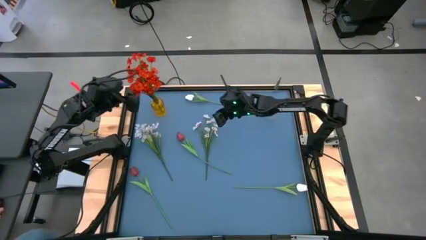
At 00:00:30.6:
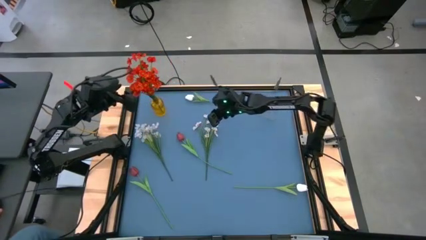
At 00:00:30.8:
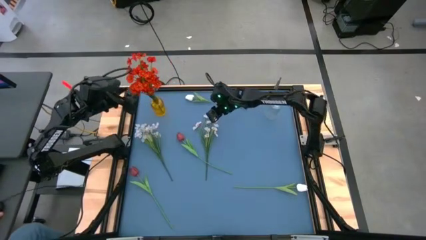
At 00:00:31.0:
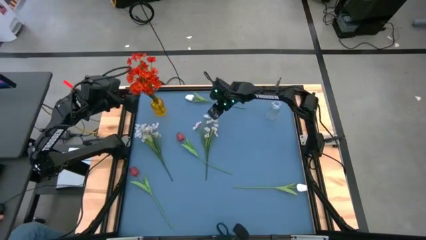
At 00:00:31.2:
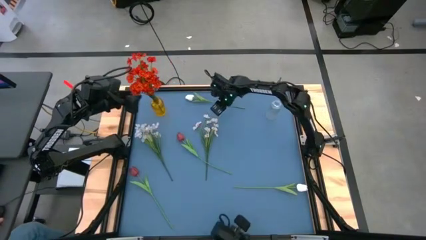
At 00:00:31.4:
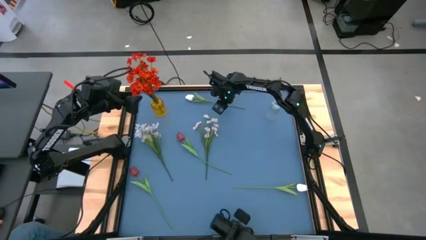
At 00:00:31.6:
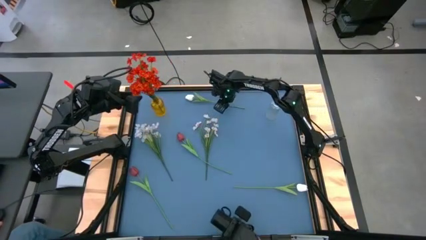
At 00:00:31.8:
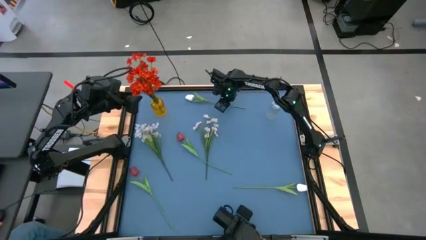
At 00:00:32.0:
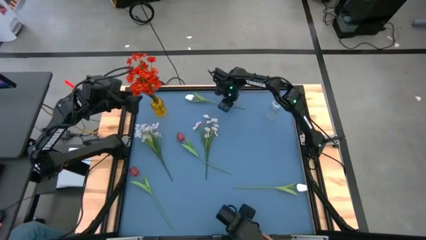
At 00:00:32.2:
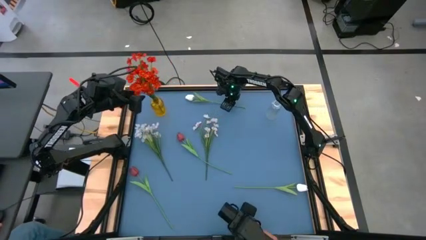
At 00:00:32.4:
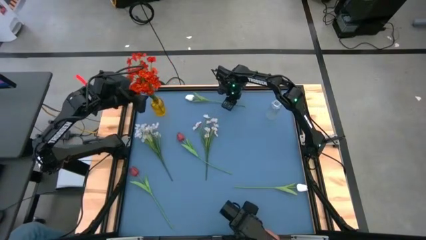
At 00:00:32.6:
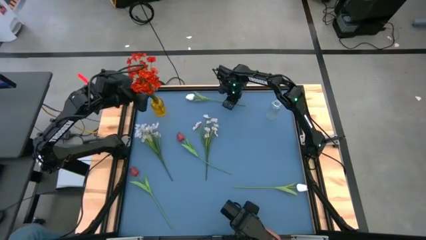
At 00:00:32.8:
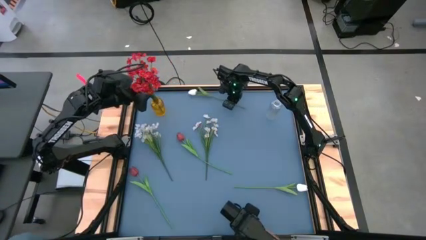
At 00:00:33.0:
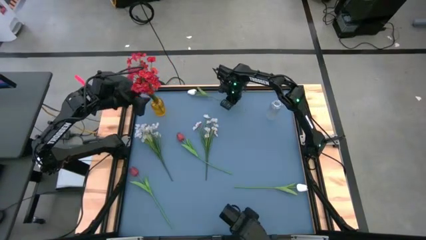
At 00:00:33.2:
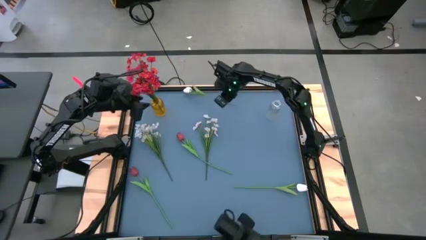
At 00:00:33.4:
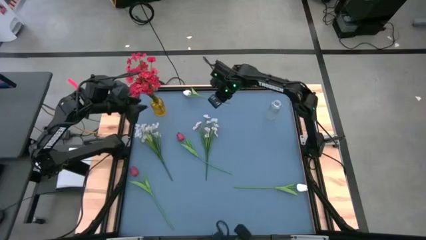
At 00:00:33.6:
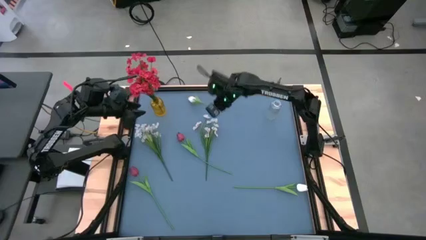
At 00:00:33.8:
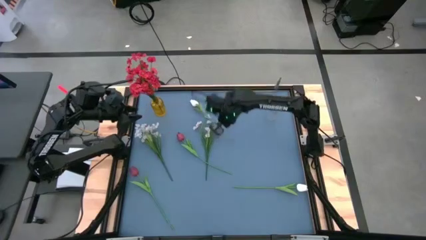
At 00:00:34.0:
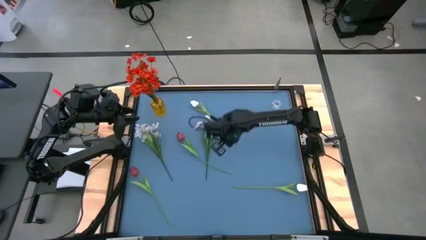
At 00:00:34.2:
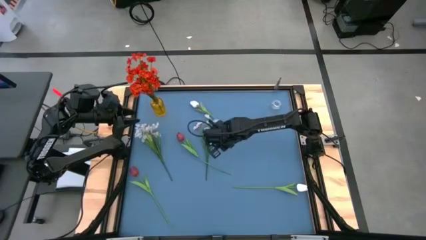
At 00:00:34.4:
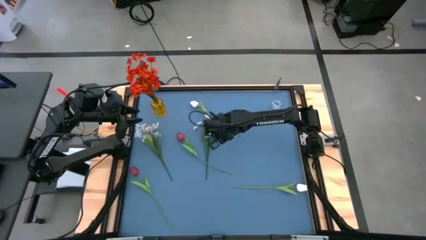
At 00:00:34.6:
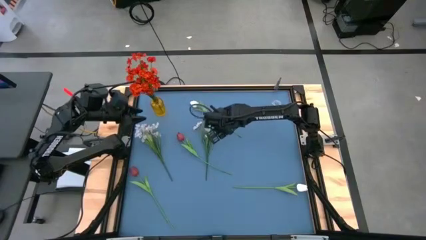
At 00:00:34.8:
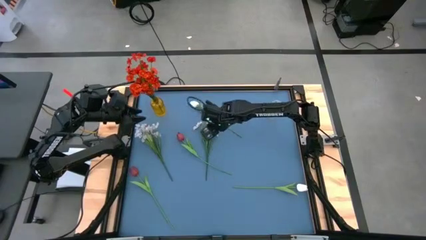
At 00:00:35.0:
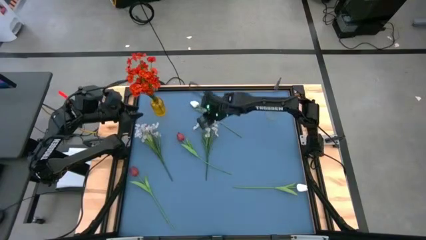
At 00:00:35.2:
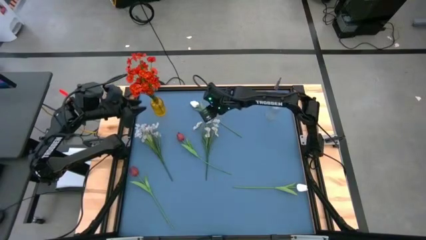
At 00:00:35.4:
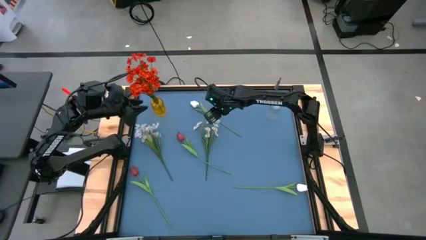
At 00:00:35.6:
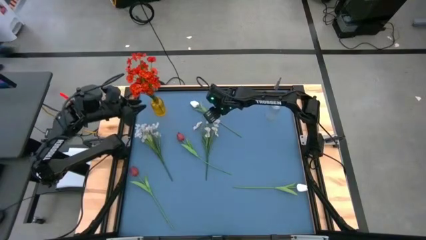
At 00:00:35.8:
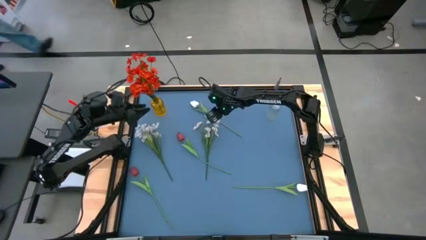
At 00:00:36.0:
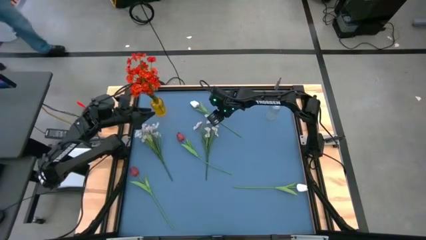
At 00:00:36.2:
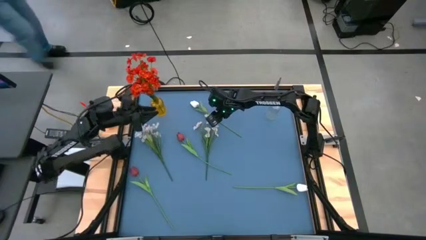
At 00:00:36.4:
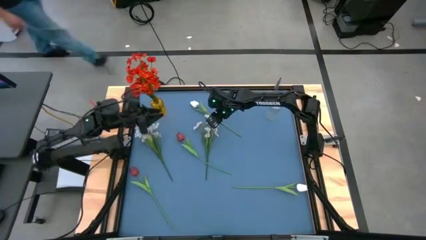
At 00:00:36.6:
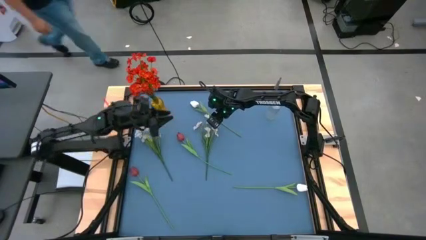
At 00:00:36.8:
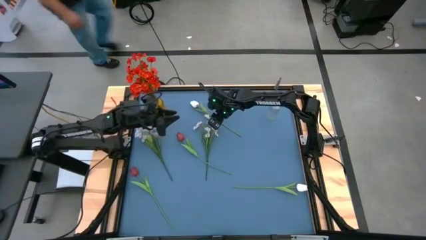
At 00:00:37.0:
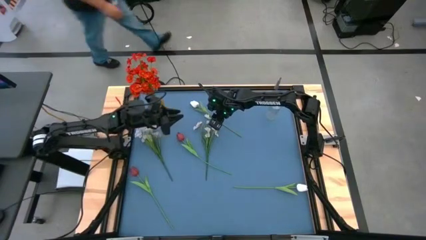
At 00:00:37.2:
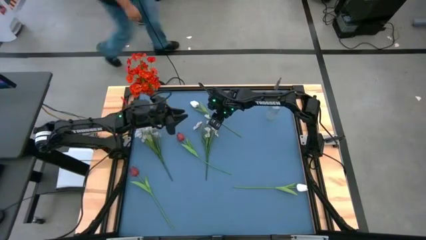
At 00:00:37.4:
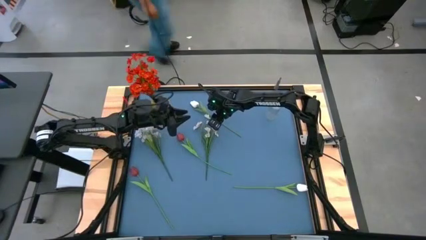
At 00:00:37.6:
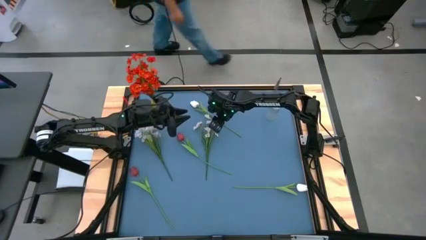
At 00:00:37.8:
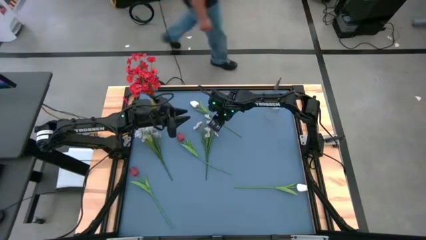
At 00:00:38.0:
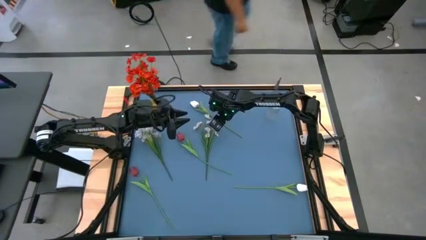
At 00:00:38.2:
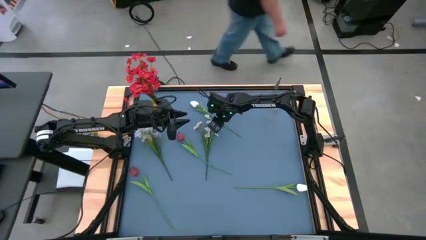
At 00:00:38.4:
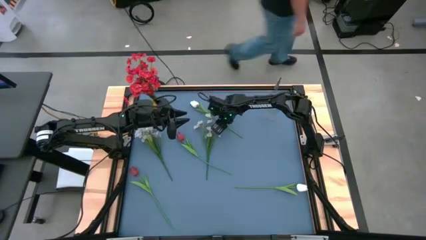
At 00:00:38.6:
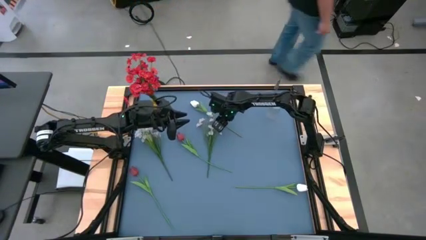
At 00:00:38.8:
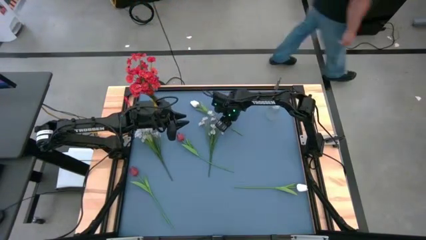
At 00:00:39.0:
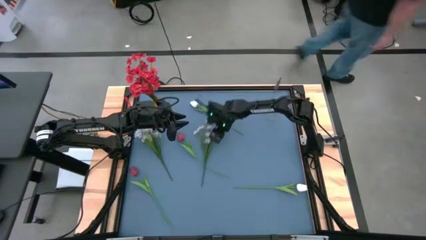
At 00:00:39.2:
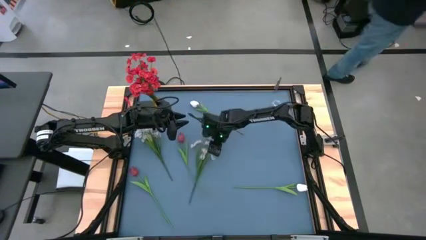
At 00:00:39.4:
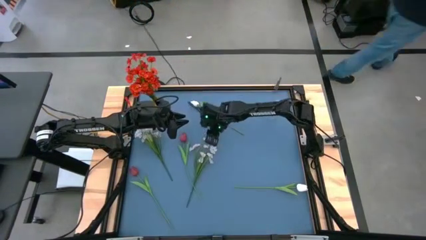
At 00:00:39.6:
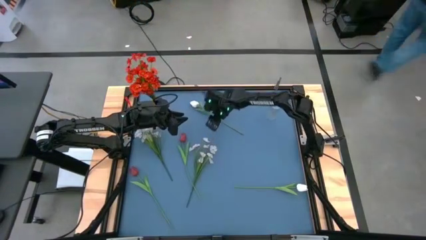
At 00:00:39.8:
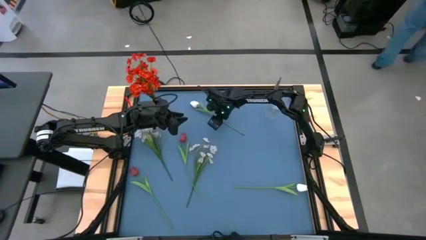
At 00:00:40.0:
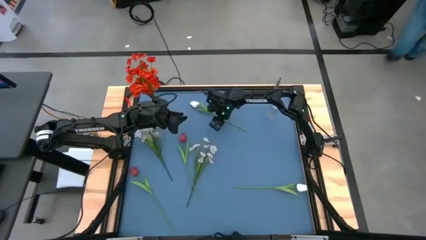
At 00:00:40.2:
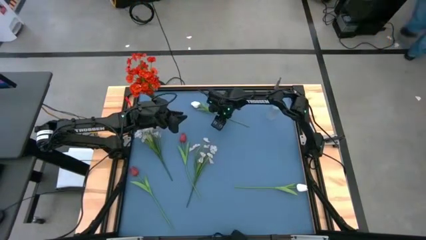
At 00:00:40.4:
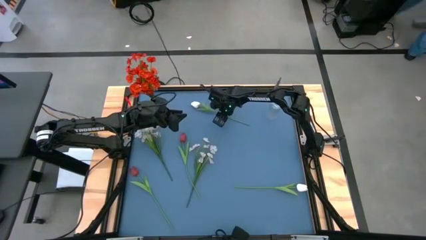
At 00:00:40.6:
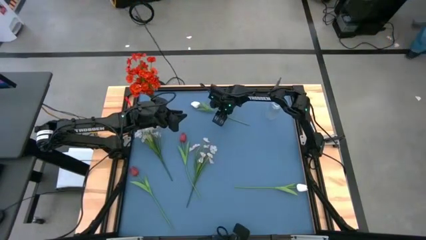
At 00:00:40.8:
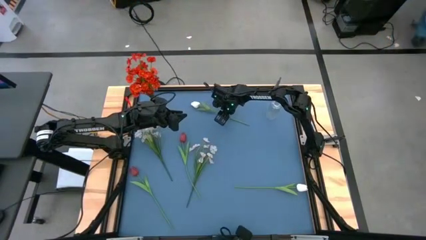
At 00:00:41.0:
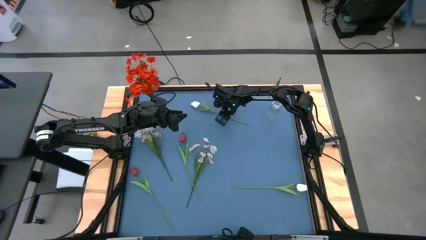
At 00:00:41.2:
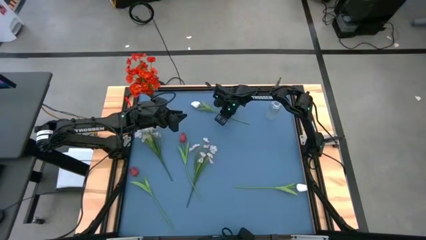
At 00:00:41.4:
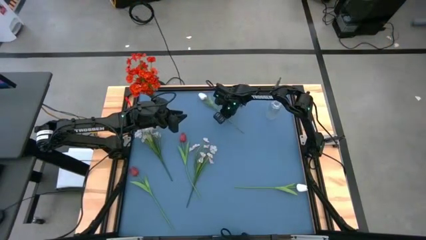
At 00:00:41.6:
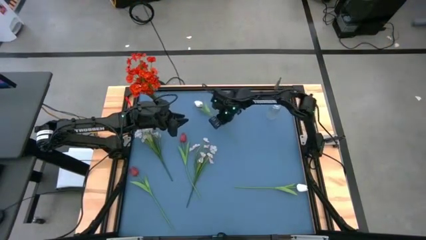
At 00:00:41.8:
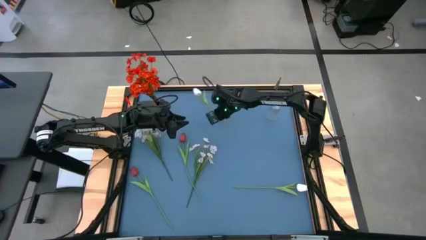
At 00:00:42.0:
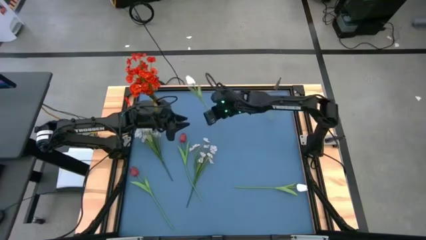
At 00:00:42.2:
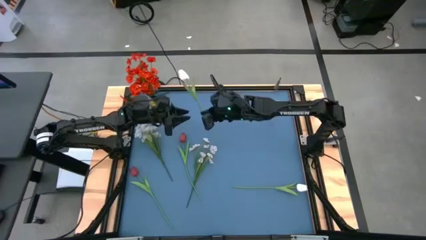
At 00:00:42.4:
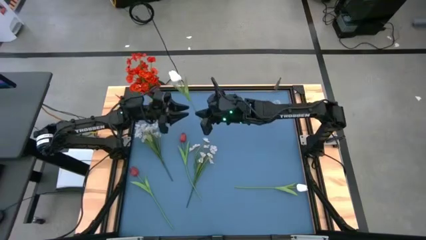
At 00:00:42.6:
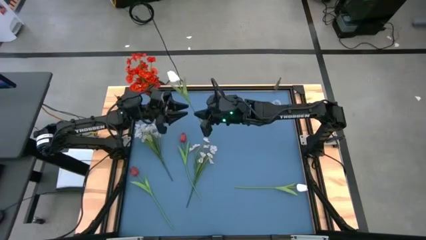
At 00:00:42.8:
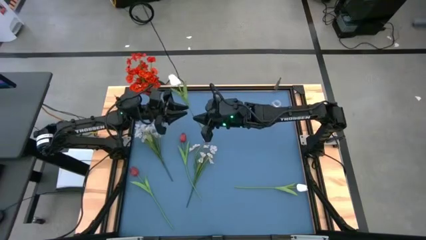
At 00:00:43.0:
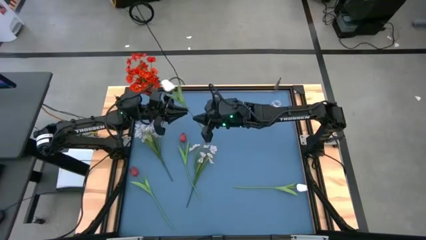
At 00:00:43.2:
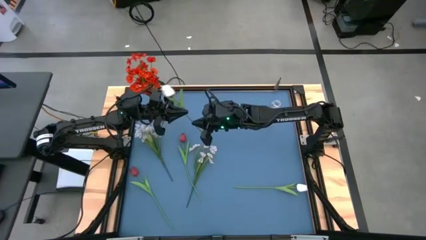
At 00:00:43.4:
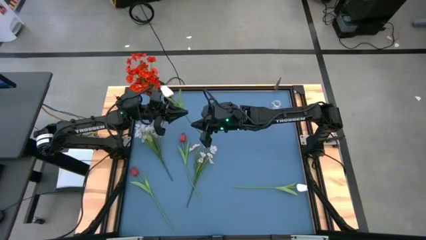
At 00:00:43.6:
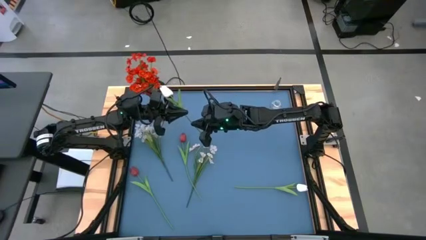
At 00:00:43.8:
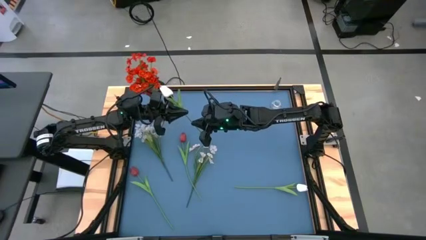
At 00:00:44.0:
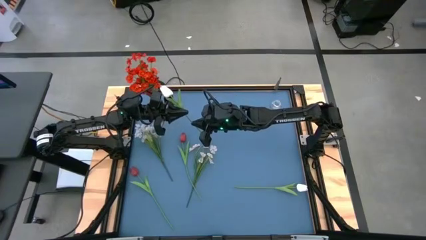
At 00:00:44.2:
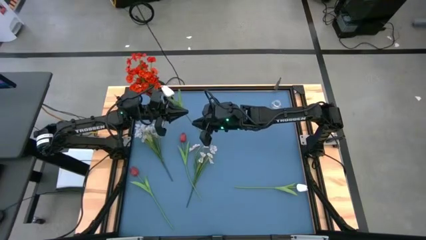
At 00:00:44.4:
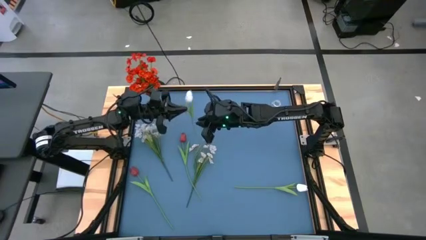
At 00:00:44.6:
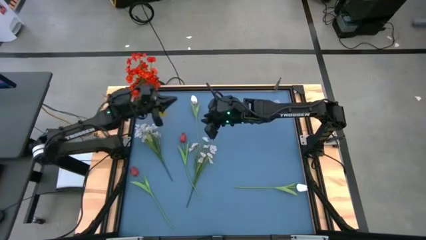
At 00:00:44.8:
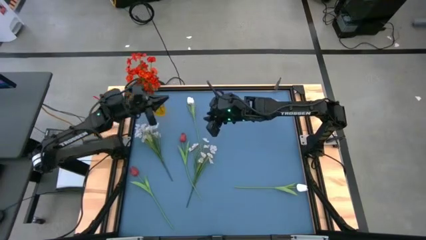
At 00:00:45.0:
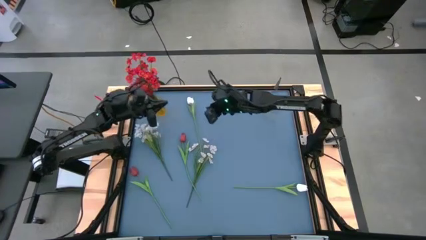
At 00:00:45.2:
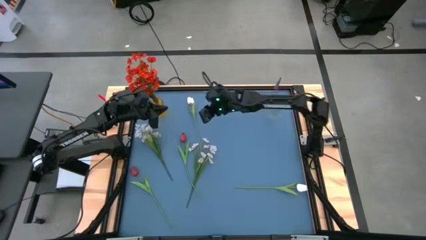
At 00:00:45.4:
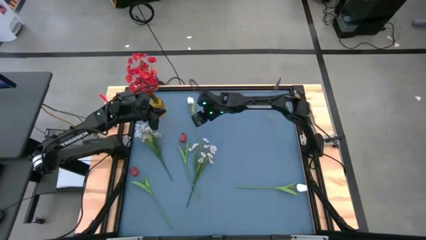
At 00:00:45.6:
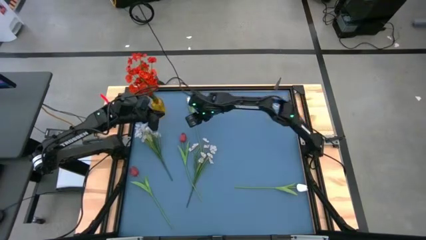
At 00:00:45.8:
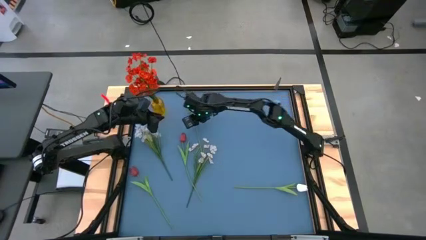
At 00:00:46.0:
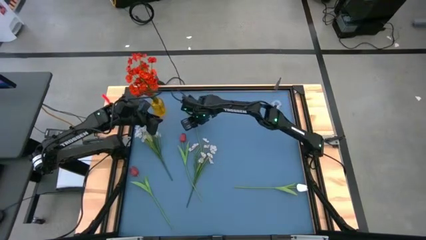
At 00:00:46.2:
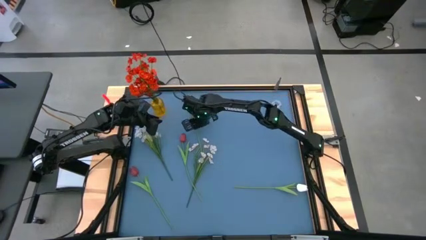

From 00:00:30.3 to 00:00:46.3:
Task: Sort flowers into vase by color
Put the top white flowers into the yellow transparent flower vase
